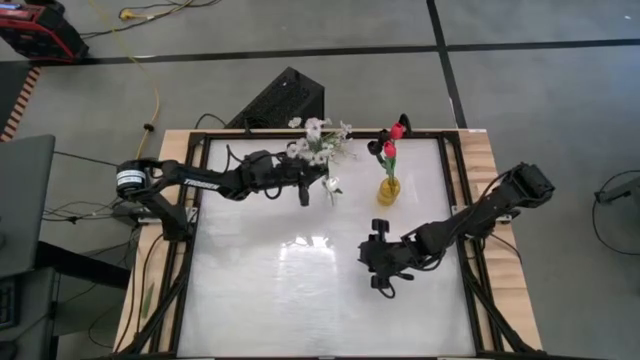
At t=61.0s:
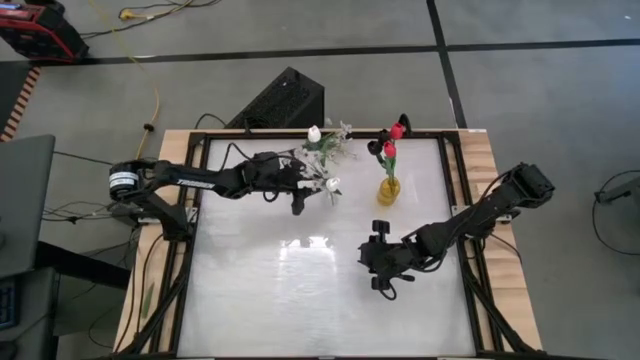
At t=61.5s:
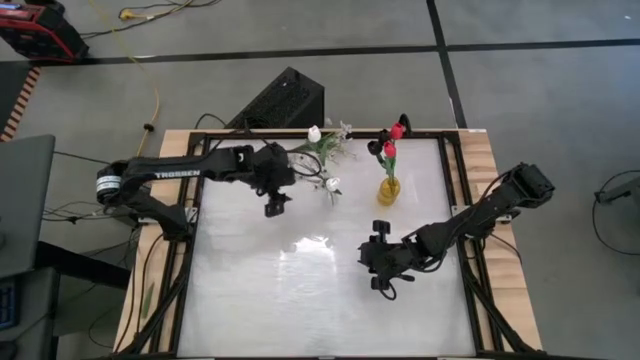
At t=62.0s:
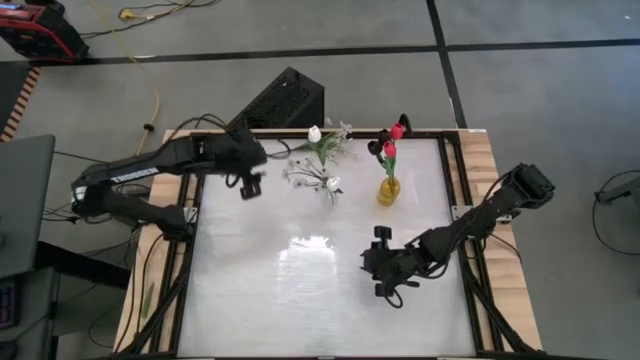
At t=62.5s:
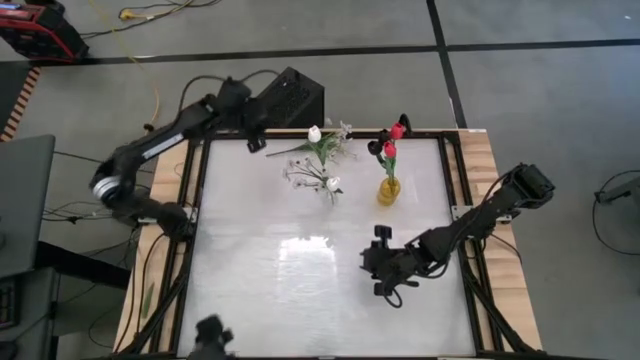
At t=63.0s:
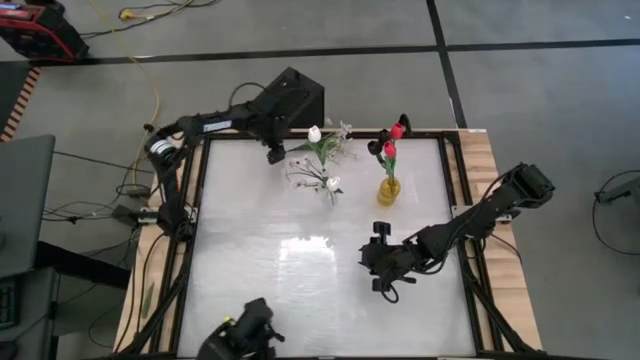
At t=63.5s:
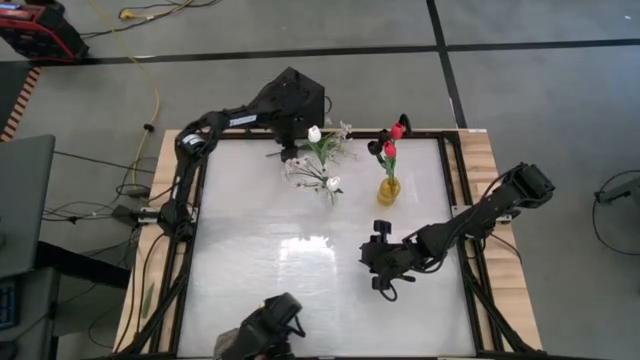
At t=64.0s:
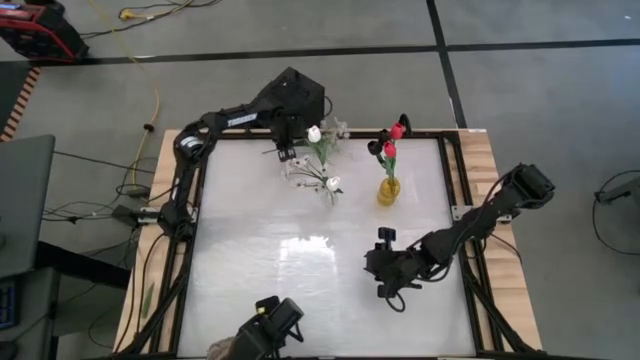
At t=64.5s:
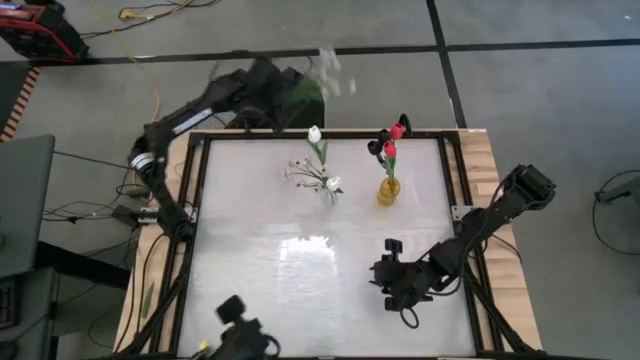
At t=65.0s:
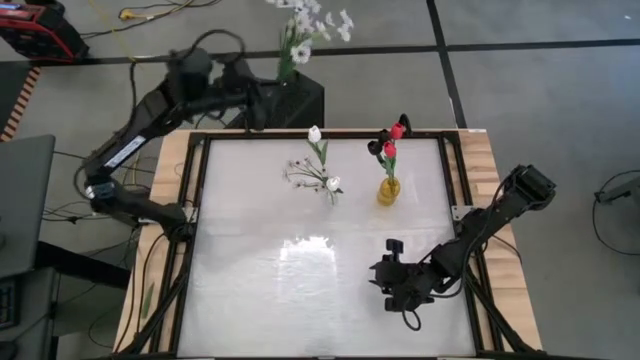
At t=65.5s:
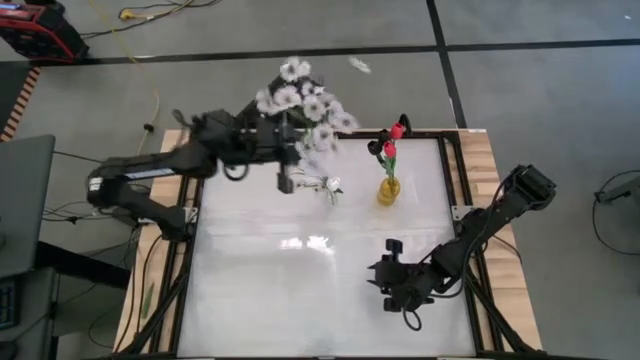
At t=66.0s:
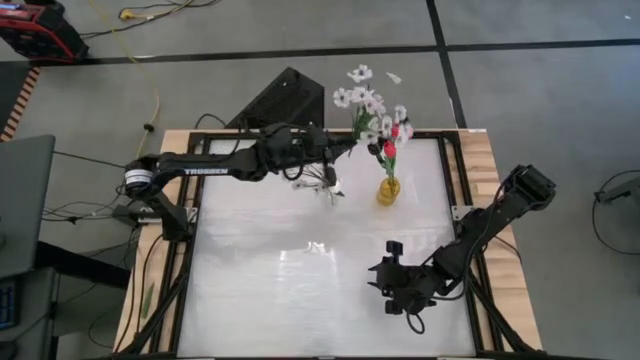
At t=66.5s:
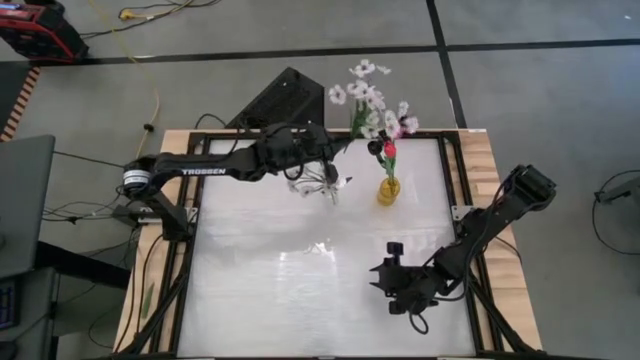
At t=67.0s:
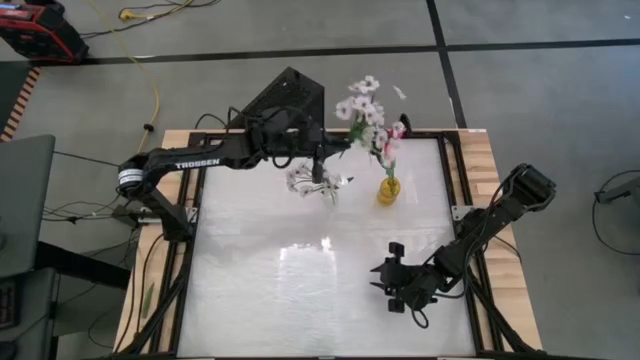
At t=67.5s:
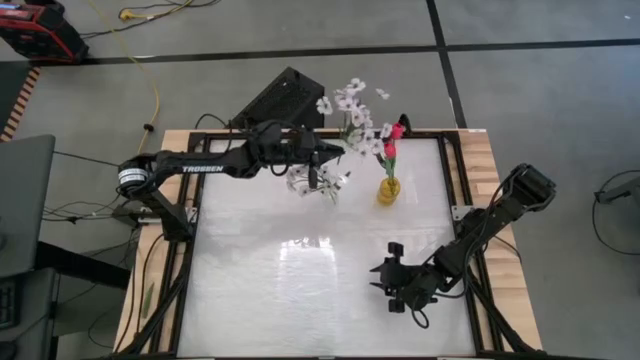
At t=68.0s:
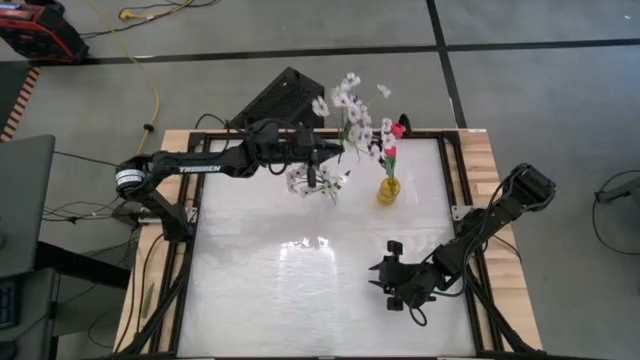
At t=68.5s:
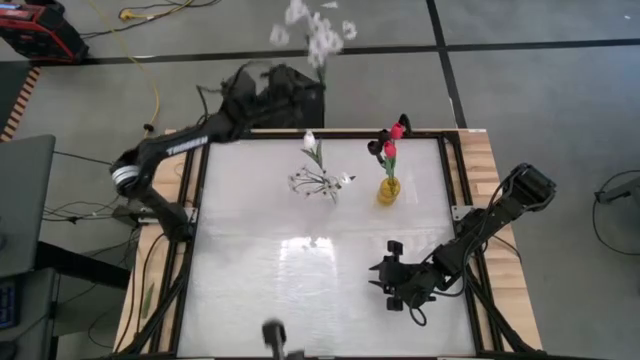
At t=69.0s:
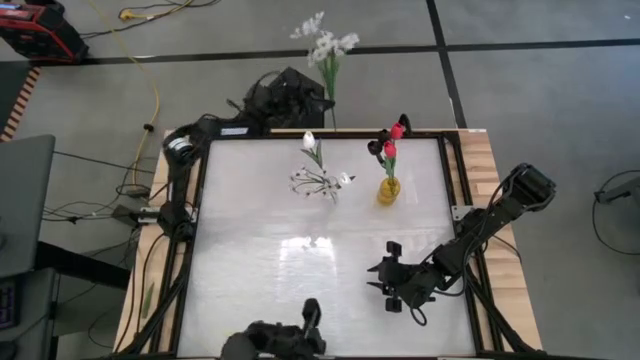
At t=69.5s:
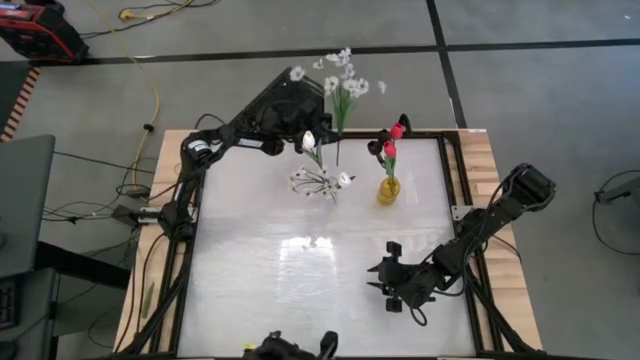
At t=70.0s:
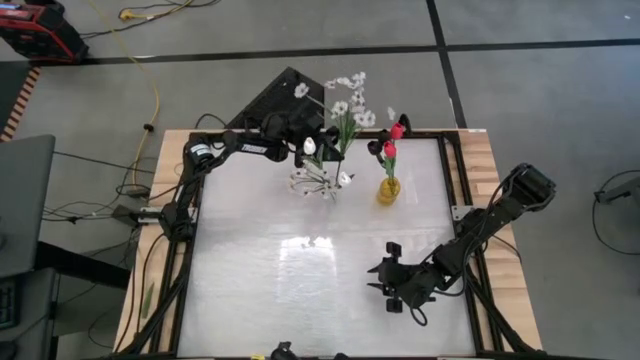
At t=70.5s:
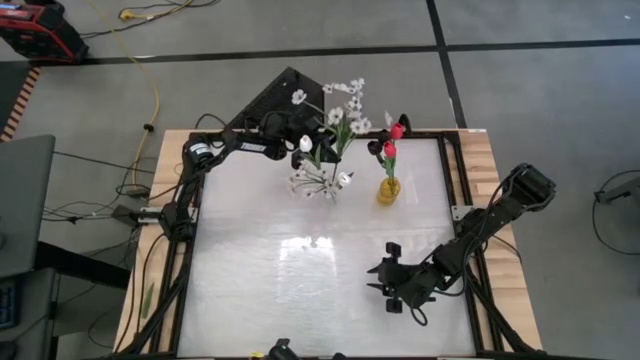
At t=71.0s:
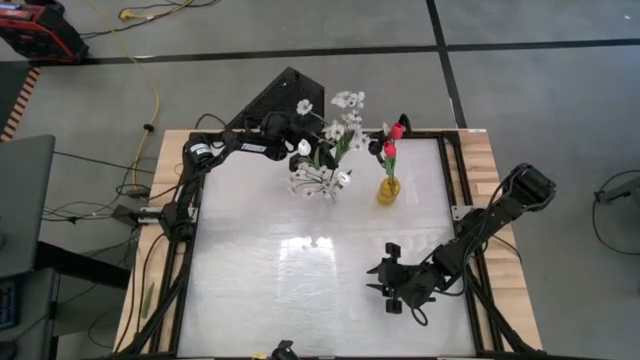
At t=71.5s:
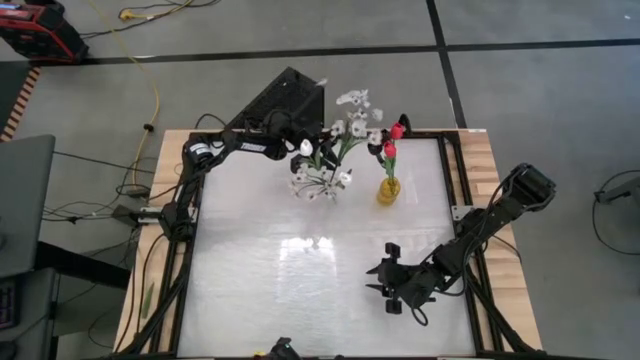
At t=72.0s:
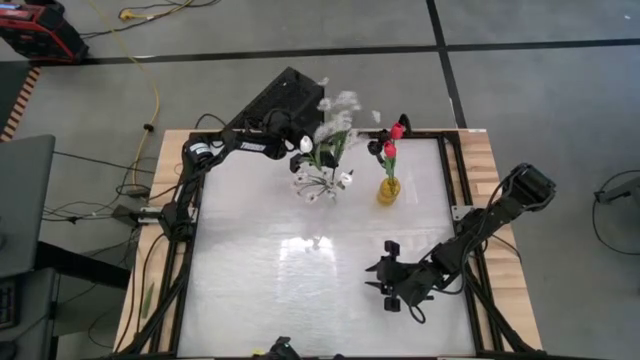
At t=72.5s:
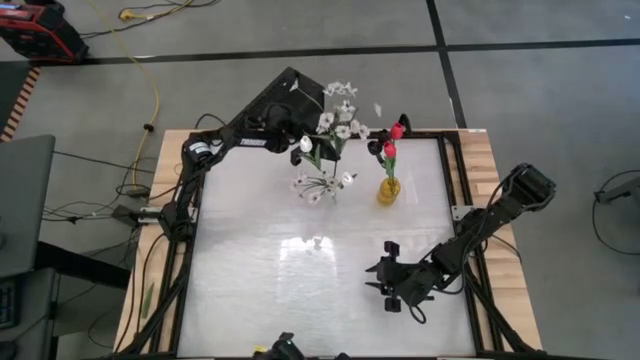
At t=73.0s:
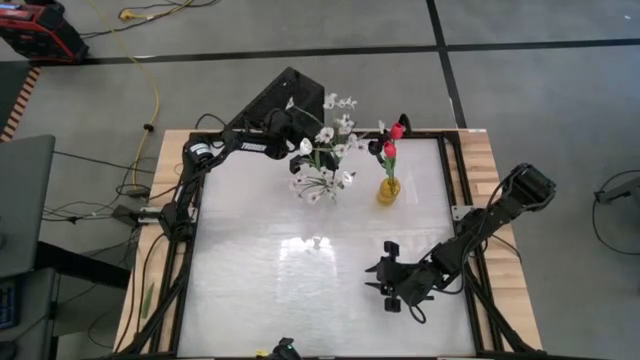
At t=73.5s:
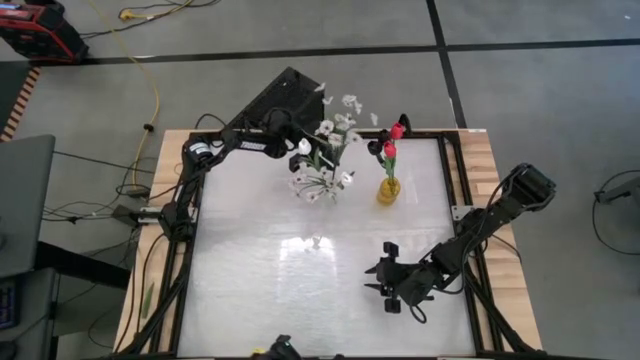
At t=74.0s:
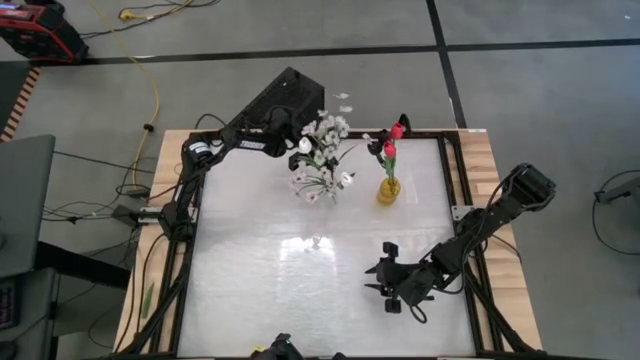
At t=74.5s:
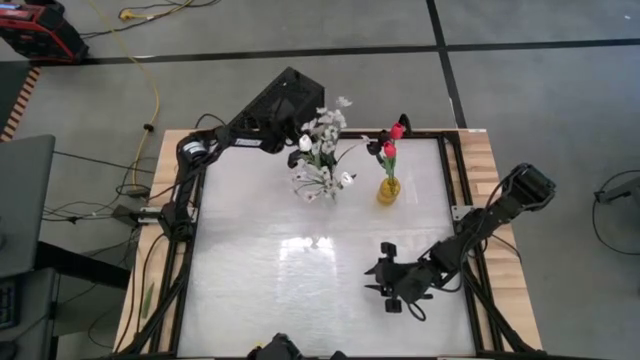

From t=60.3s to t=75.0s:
Task: Sort flowers into vase by color
Put the white flower into the transparent vase

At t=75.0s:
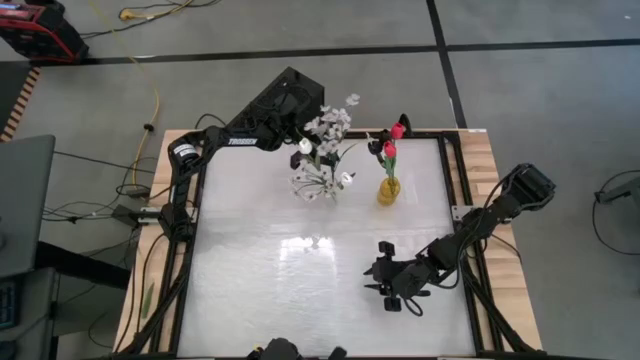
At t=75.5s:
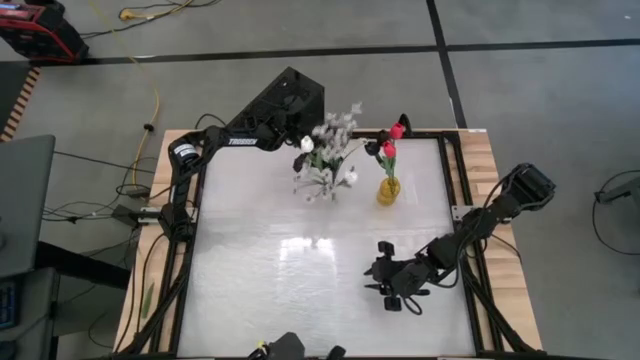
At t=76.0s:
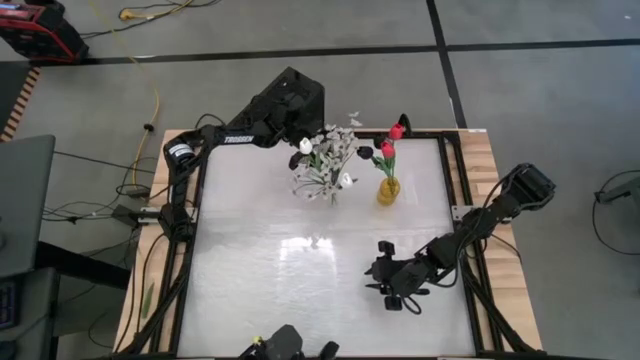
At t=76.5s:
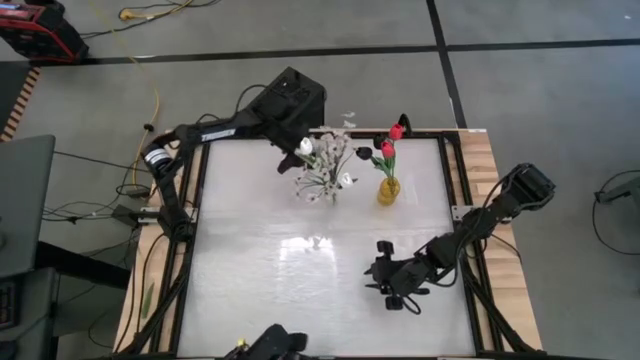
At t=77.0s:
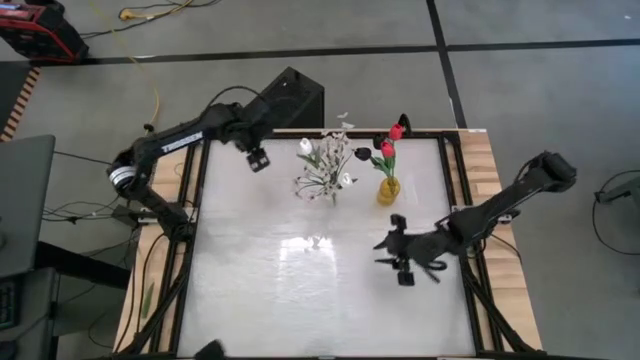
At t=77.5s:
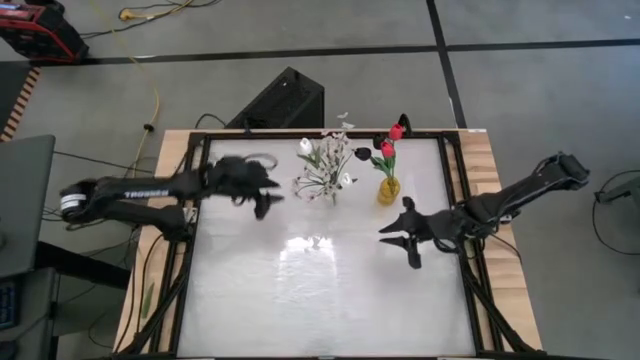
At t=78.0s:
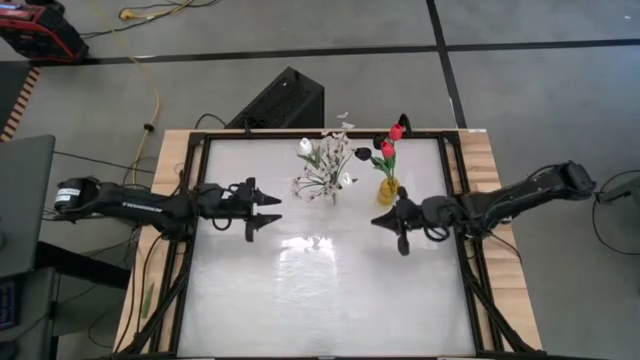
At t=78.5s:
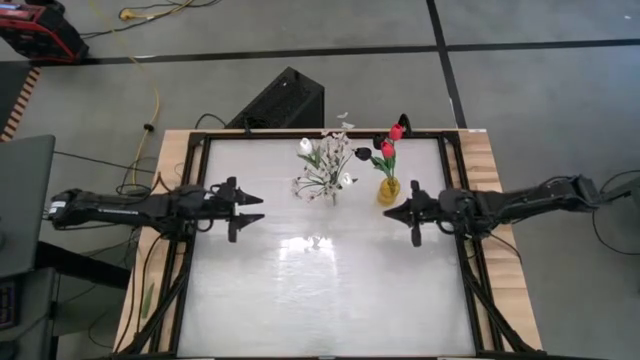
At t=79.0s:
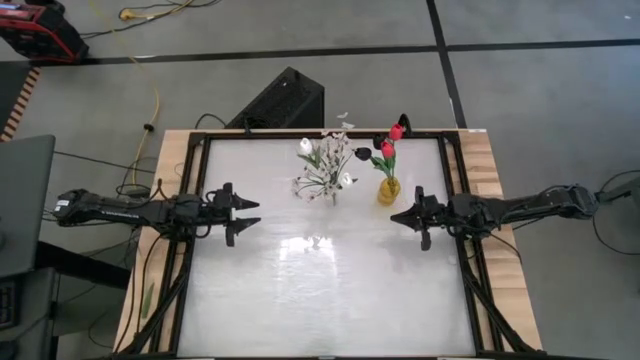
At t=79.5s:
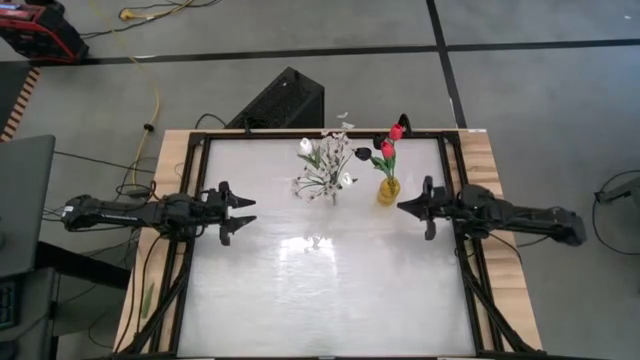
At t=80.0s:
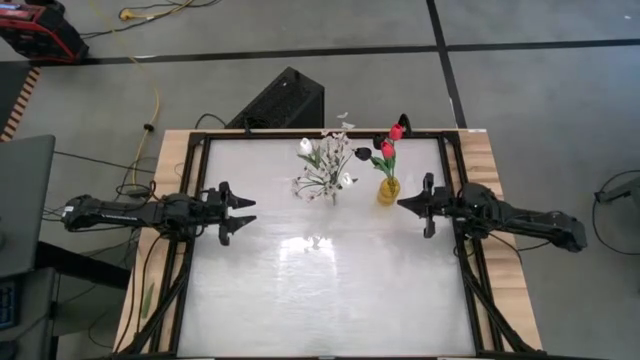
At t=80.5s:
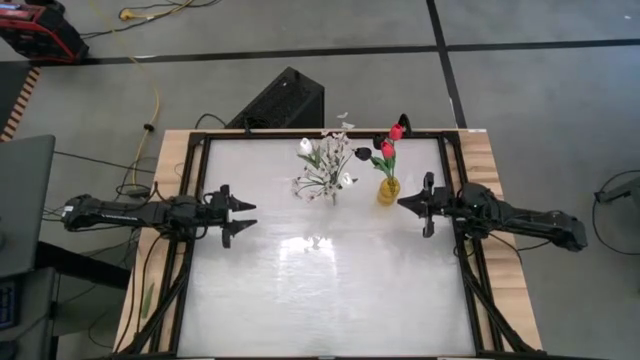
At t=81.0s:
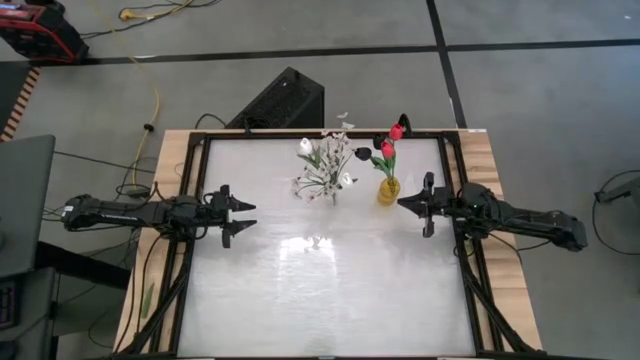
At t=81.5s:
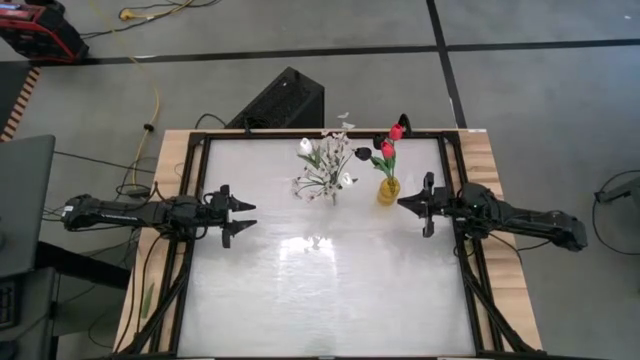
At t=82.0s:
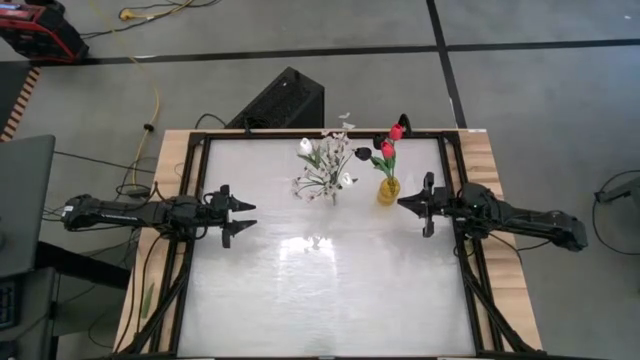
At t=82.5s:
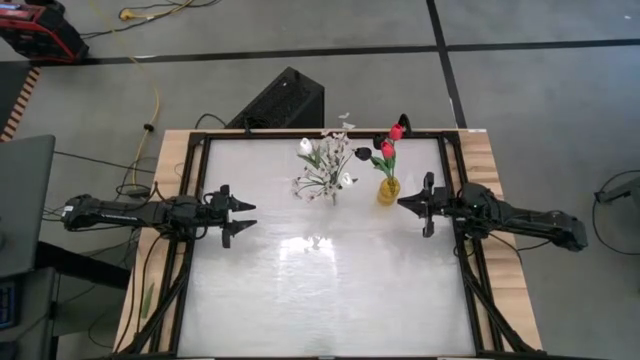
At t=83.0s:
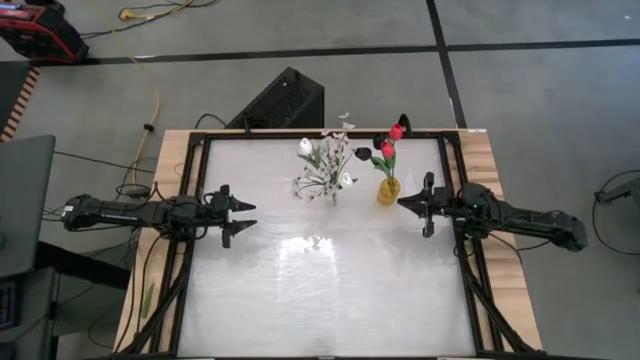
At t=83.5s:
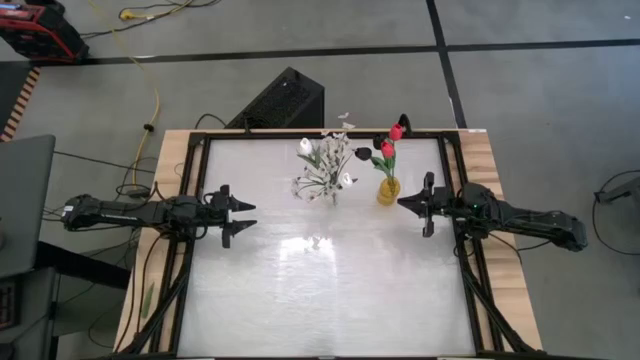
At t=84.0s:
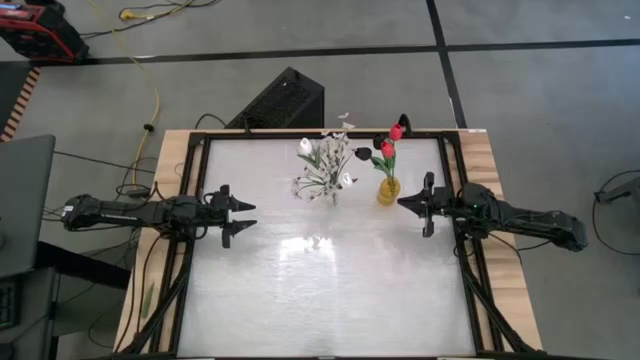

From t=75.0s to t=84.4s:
Return to Home Position
